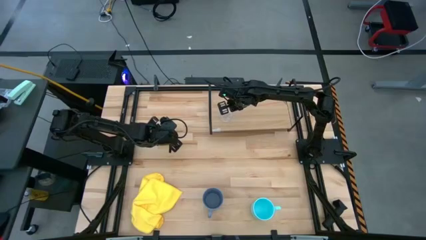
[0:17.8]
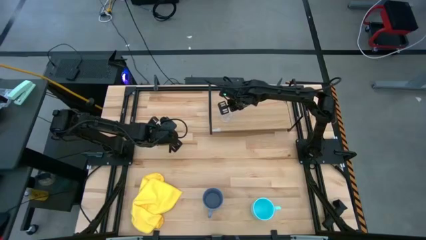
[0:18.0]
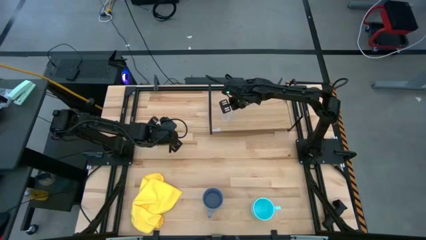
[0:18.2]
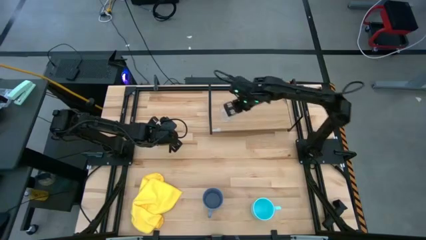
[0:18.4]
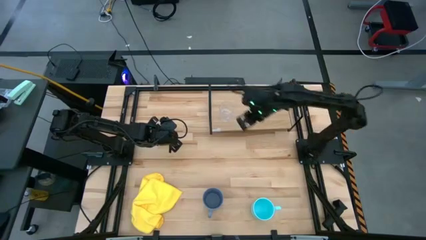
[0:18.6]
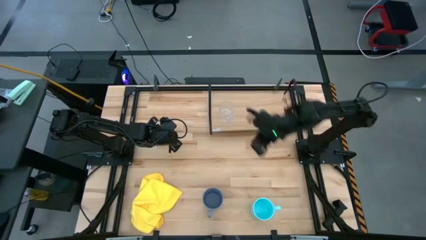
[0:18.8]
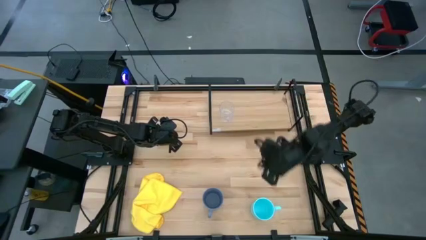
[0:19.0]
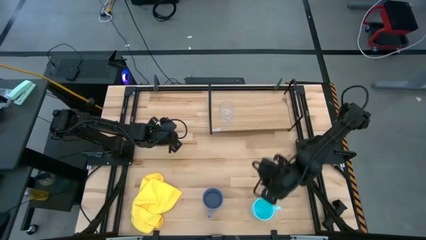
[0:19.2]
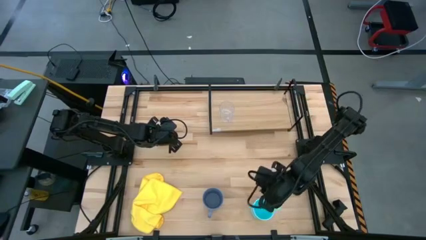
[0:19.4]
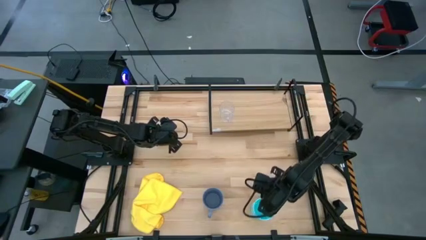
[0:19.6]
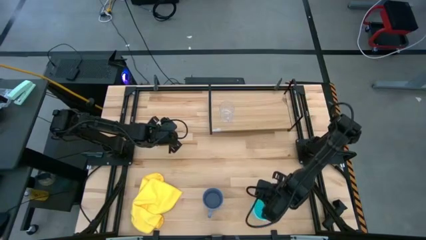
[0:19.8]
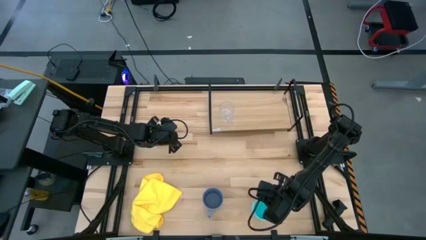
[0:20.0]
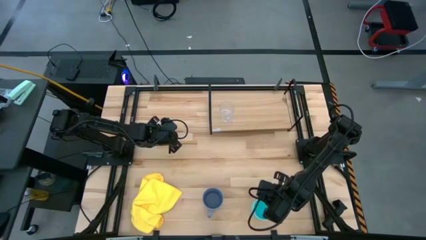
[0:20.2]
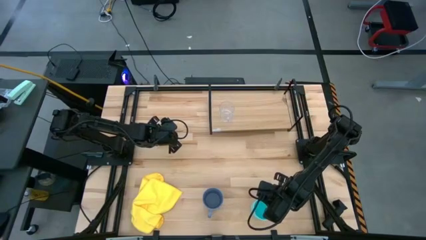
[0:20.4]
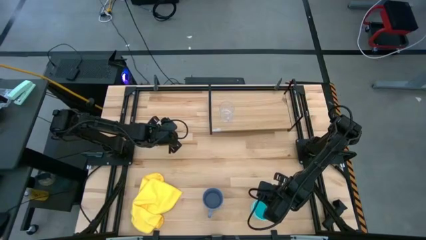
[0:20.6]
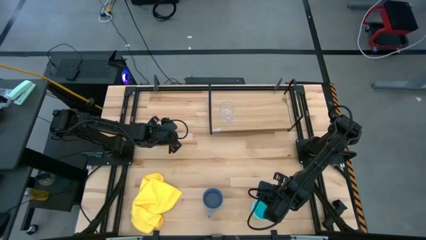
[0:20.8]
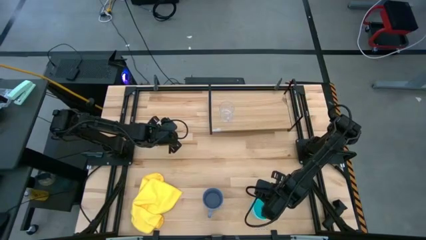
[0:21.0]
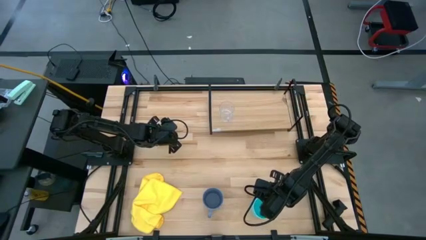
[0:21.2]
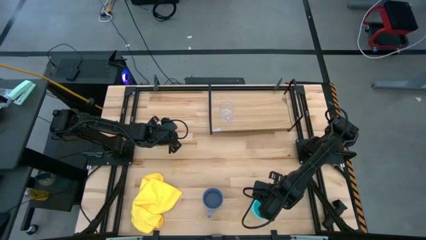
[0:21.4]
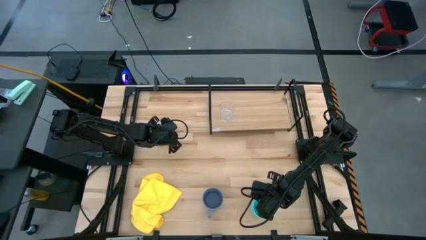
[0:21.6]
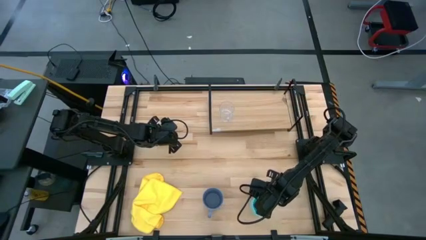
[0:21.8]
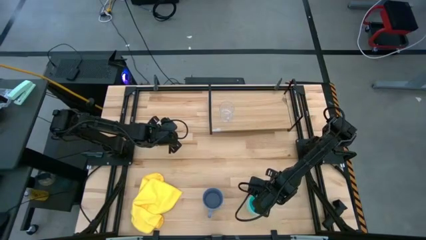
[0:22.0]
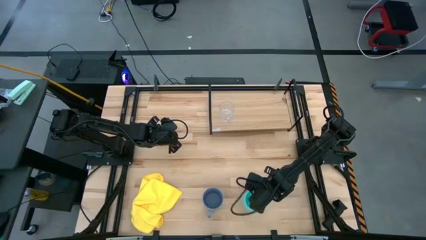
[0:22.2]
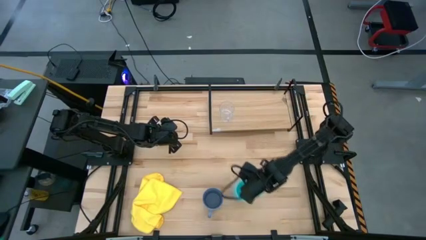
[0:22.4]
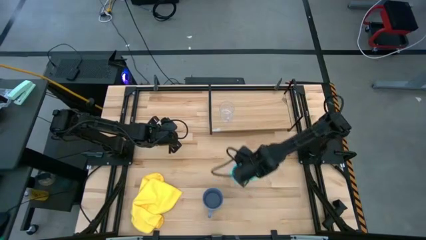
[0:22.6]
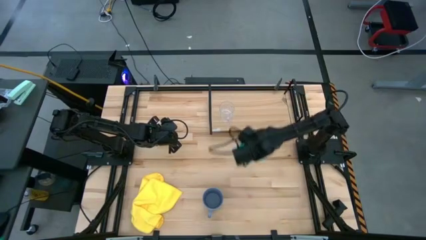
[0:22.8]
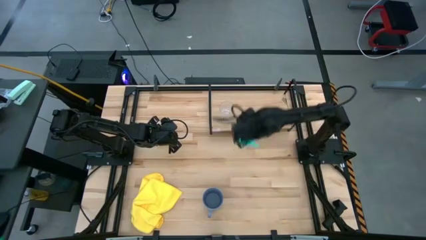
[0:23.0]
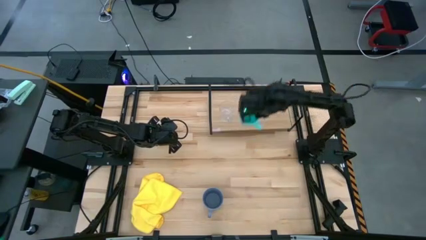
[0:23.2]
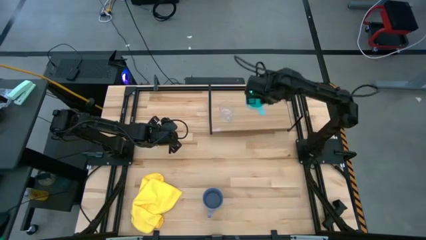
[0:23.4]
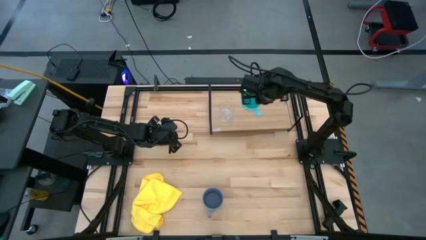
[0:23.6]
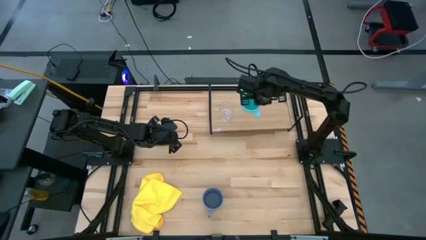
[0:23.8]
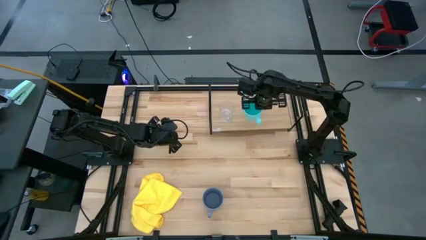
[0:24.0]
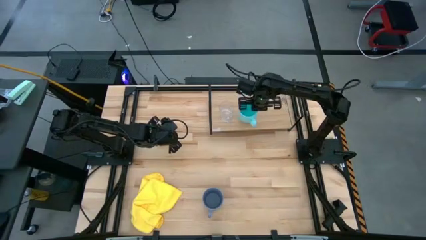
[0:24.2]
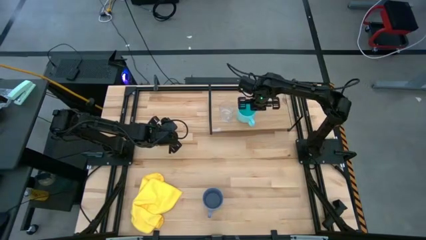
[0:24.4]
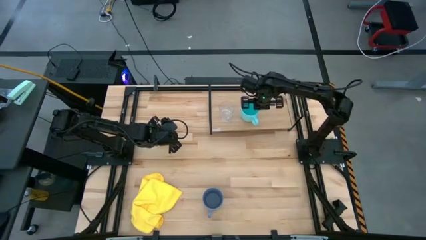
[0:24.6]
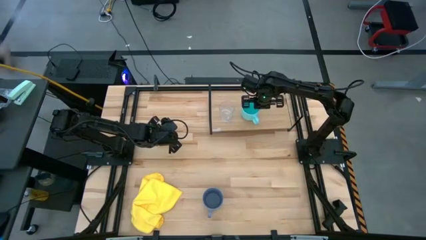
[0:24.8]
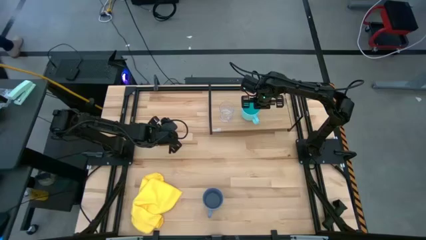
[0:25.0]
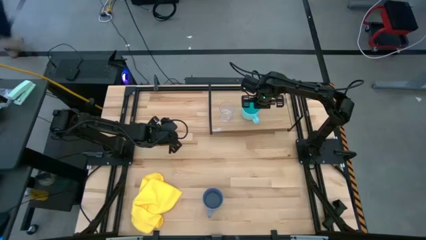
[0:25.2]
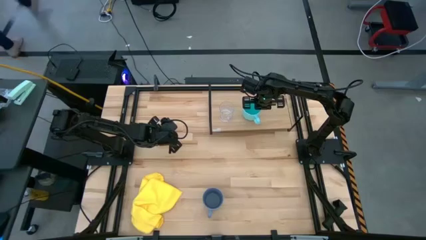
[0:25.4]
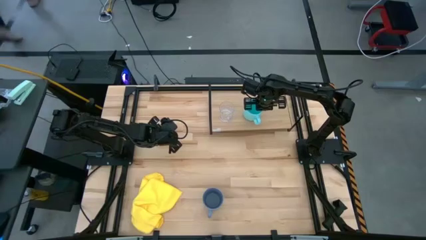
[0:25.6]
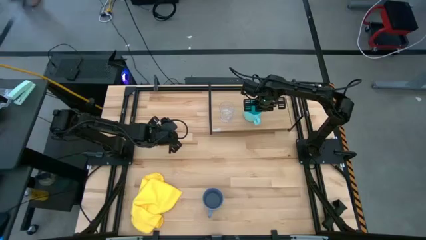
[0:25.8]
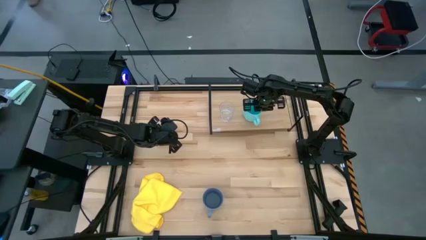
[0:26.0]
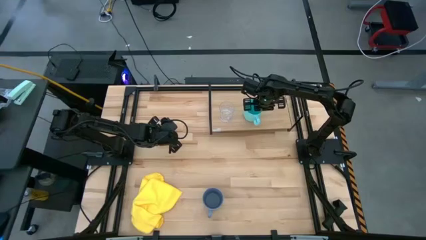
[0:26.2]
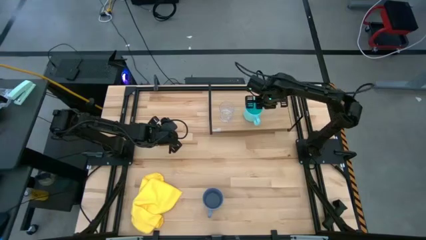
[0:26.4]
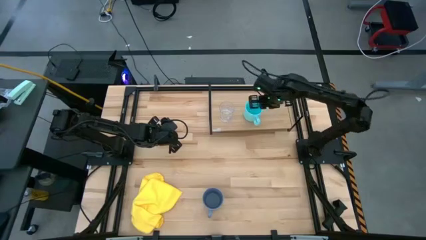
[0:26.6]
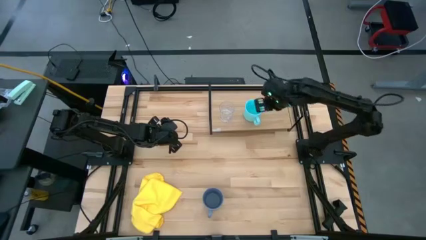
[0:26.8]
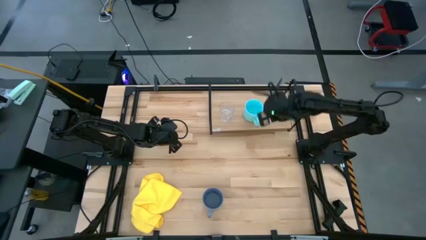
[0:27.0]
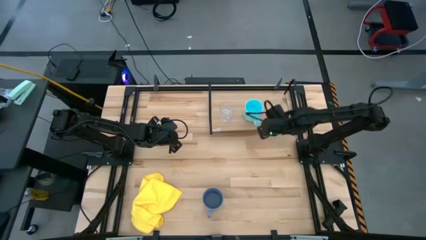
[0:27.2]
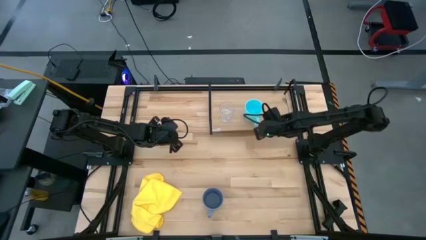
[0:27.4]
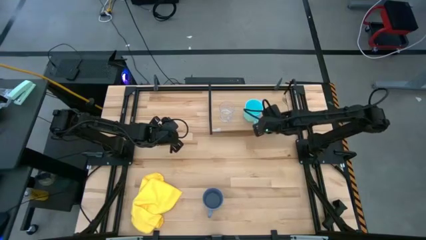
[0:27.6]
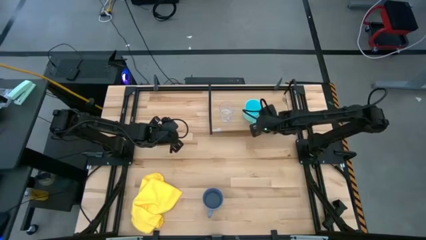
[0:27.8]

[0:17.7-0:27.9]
Task: Stack small to large cups/mugs on shelf
Put the light blue mug on the shelf
